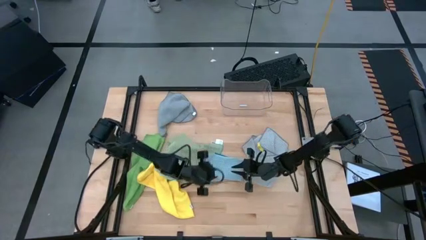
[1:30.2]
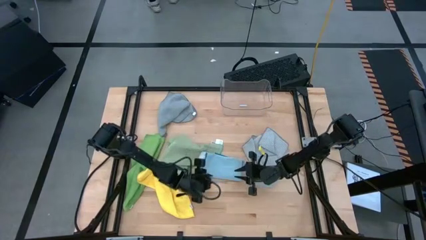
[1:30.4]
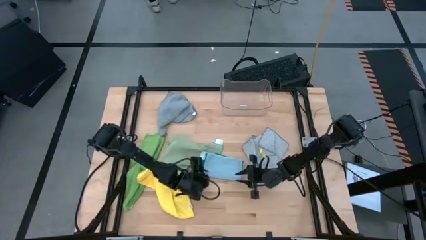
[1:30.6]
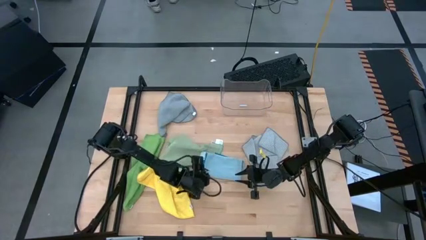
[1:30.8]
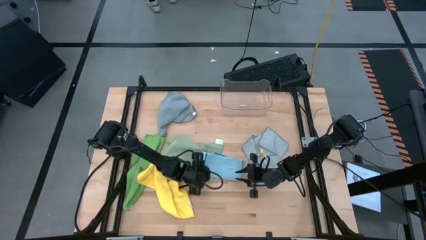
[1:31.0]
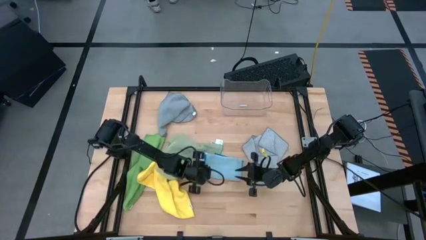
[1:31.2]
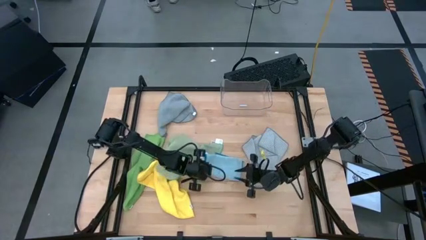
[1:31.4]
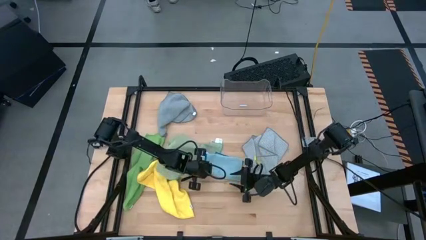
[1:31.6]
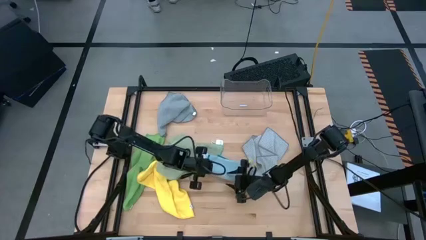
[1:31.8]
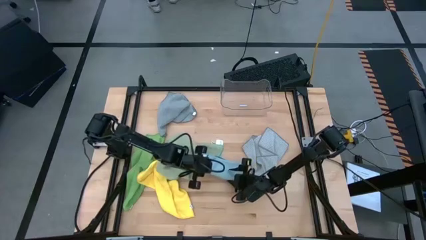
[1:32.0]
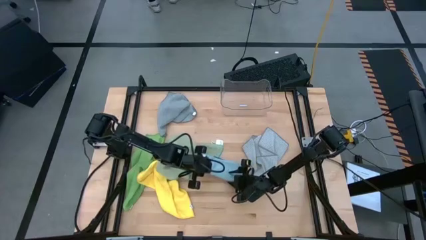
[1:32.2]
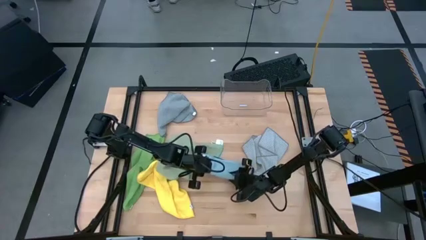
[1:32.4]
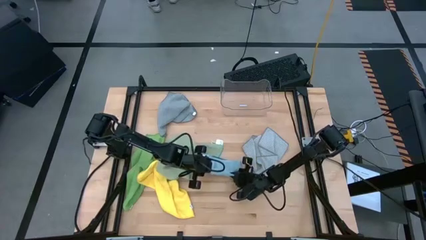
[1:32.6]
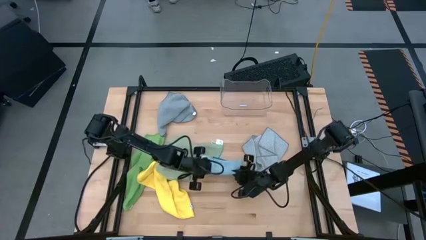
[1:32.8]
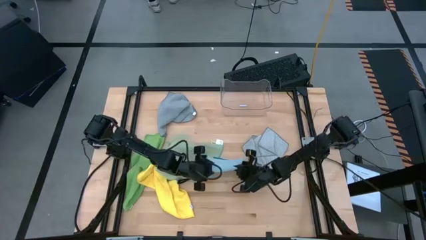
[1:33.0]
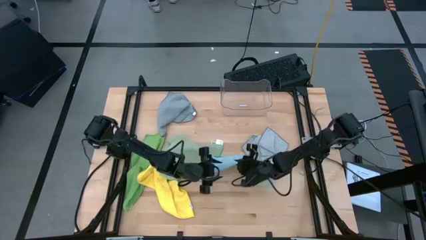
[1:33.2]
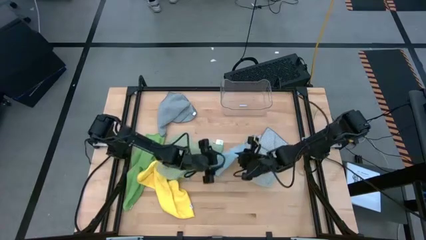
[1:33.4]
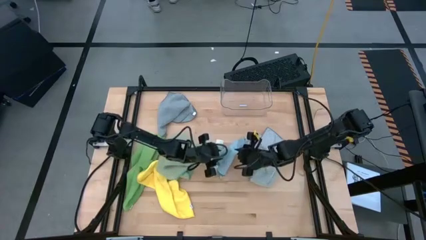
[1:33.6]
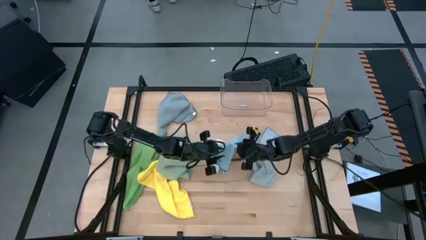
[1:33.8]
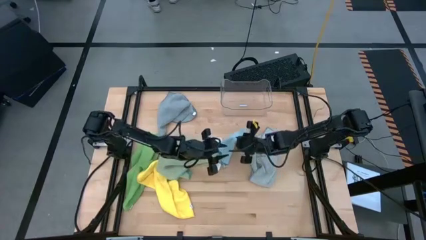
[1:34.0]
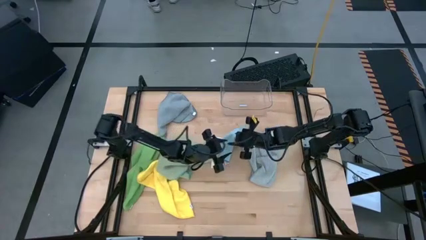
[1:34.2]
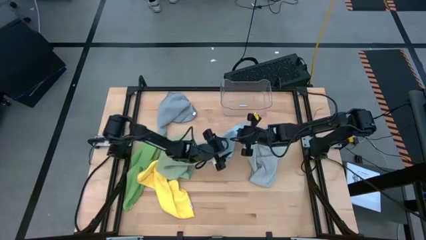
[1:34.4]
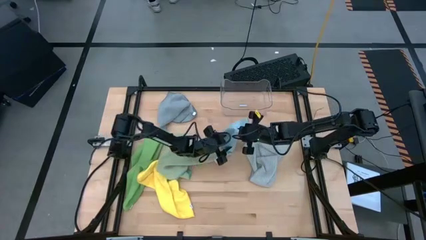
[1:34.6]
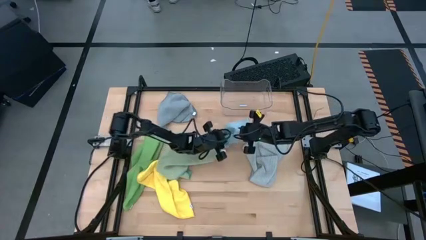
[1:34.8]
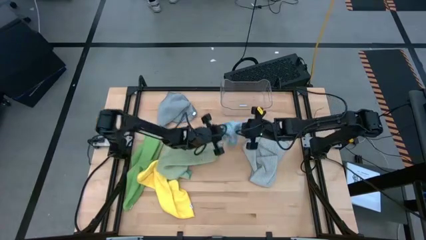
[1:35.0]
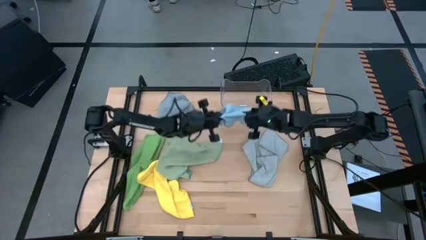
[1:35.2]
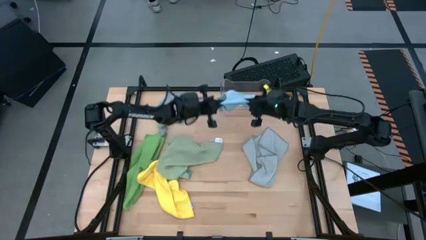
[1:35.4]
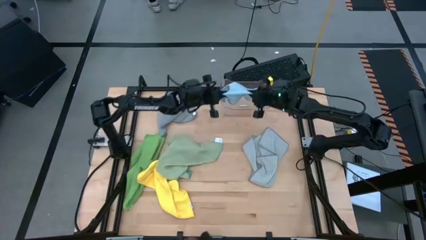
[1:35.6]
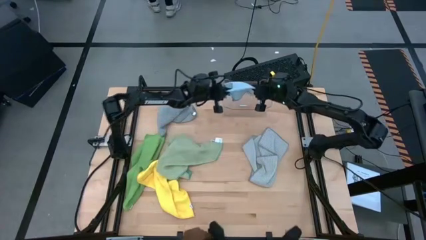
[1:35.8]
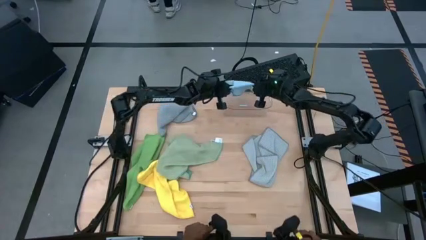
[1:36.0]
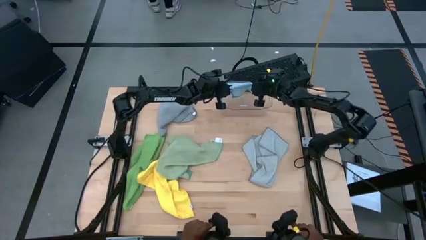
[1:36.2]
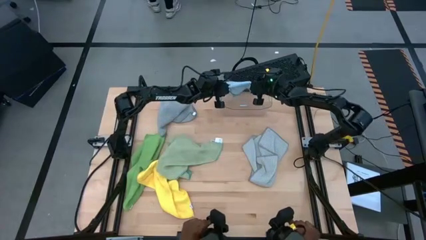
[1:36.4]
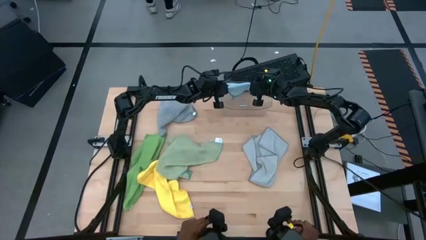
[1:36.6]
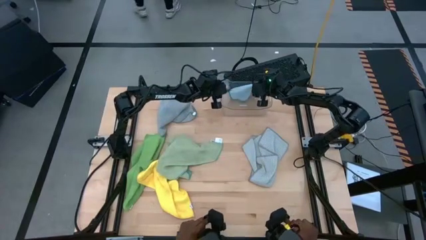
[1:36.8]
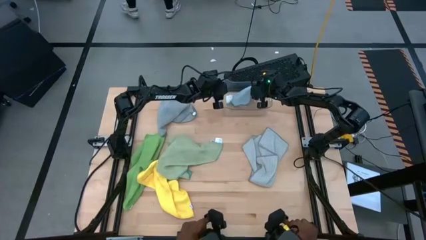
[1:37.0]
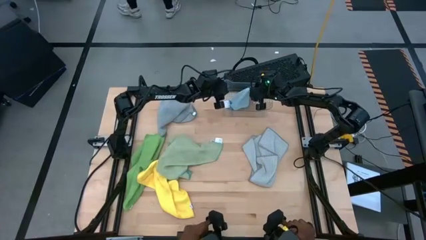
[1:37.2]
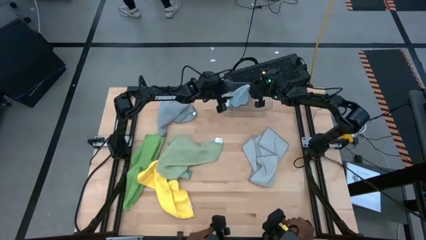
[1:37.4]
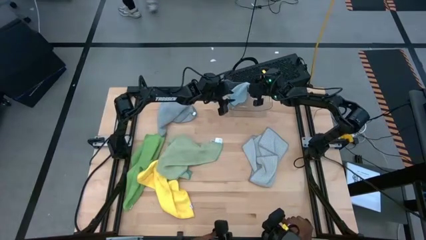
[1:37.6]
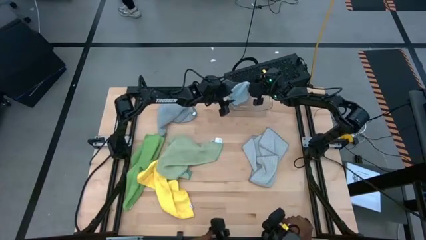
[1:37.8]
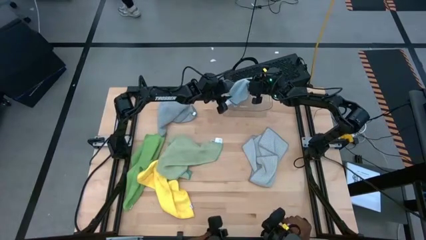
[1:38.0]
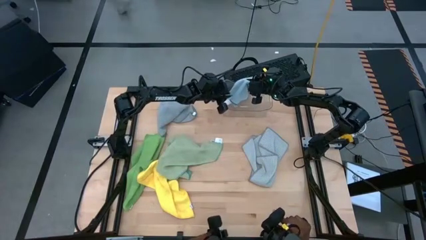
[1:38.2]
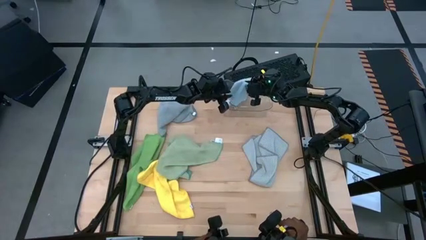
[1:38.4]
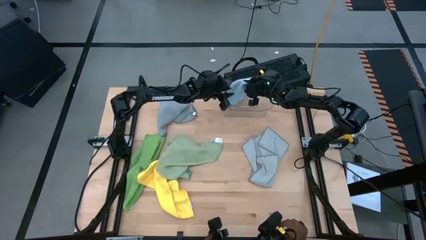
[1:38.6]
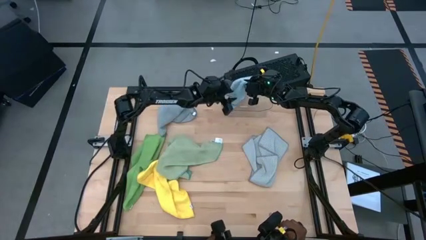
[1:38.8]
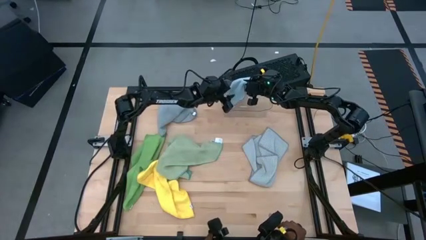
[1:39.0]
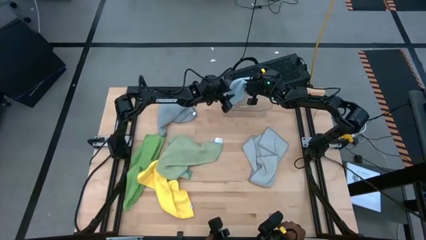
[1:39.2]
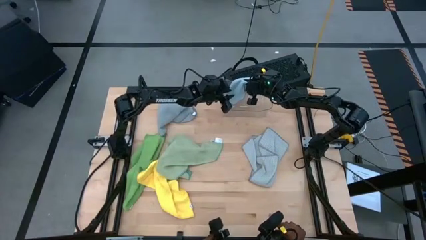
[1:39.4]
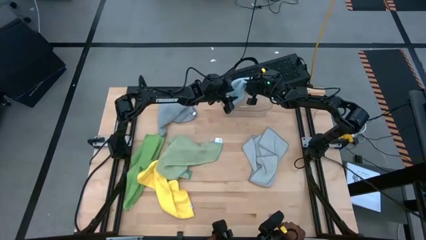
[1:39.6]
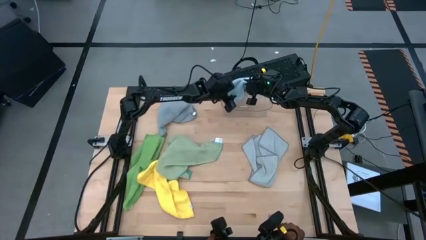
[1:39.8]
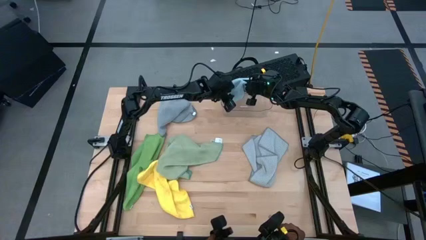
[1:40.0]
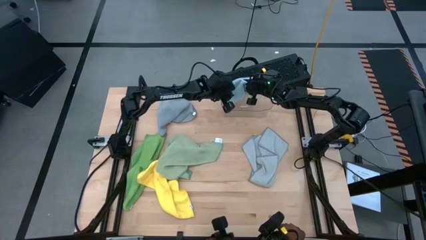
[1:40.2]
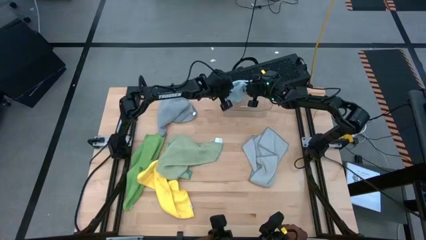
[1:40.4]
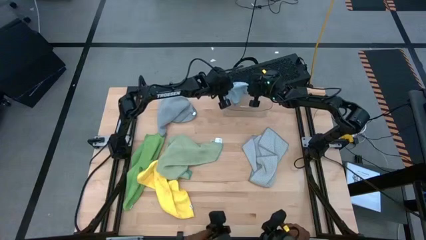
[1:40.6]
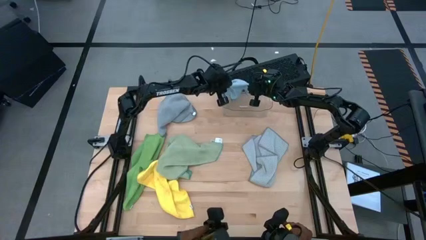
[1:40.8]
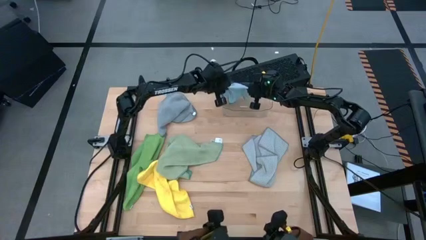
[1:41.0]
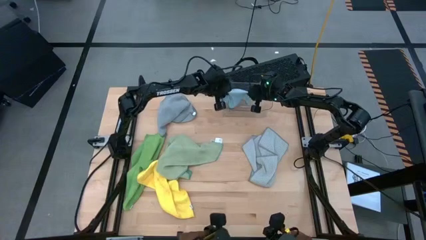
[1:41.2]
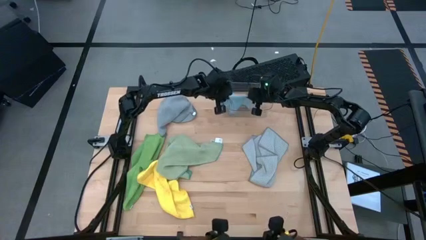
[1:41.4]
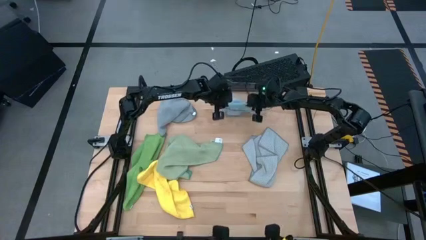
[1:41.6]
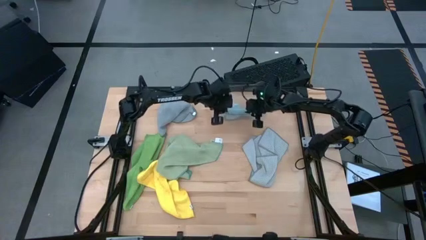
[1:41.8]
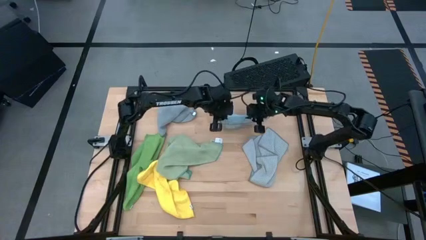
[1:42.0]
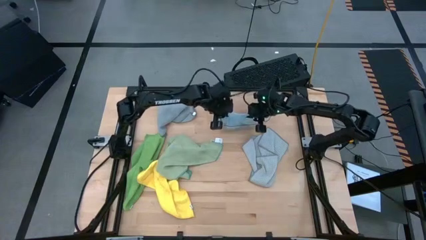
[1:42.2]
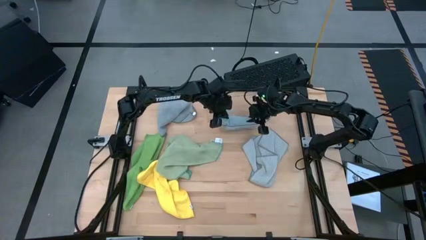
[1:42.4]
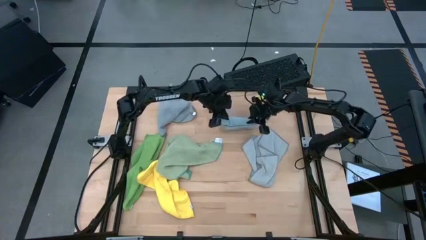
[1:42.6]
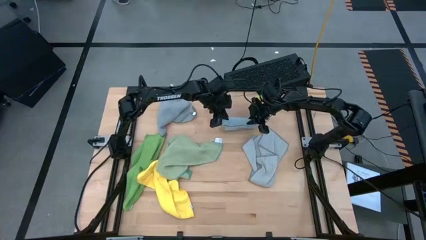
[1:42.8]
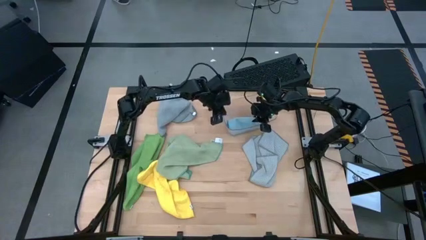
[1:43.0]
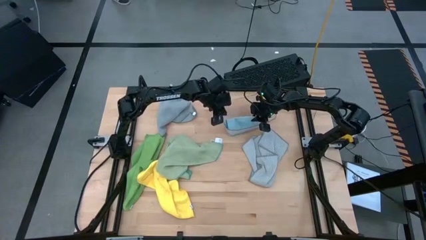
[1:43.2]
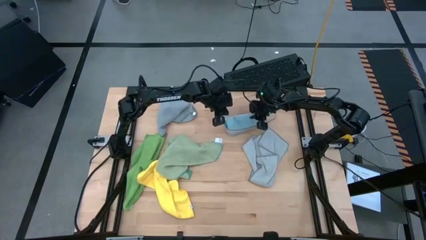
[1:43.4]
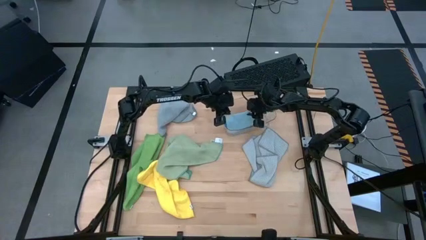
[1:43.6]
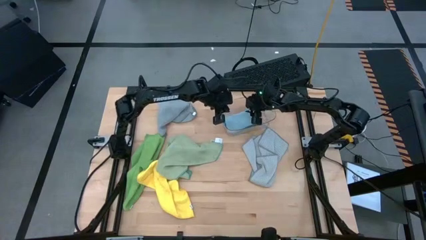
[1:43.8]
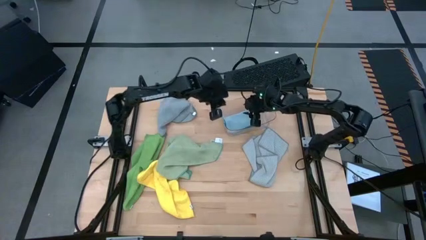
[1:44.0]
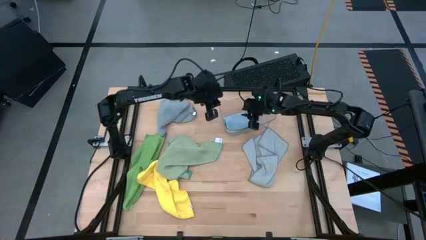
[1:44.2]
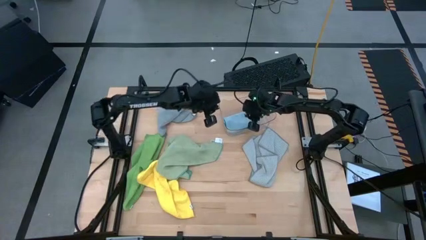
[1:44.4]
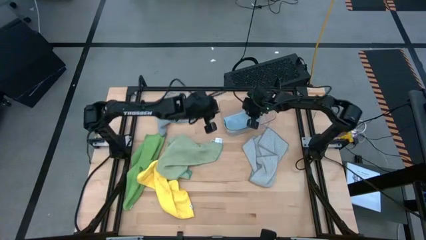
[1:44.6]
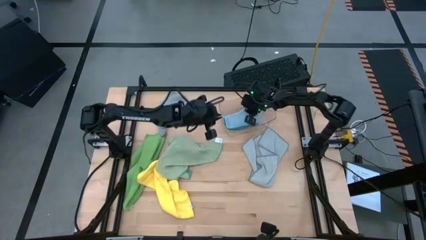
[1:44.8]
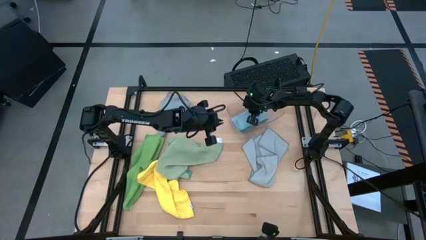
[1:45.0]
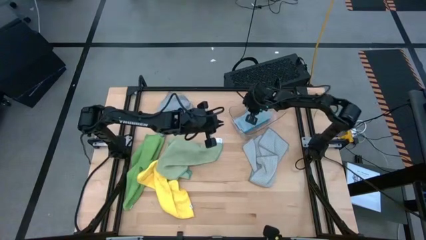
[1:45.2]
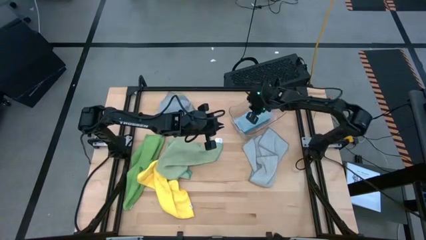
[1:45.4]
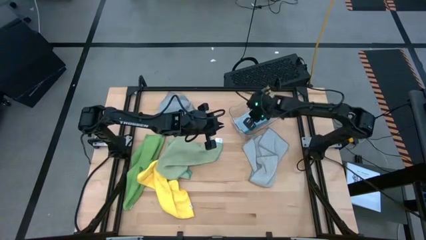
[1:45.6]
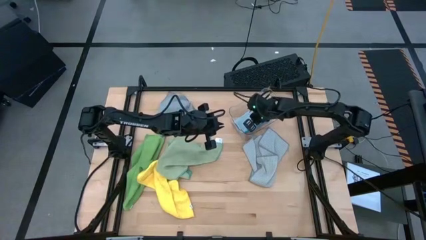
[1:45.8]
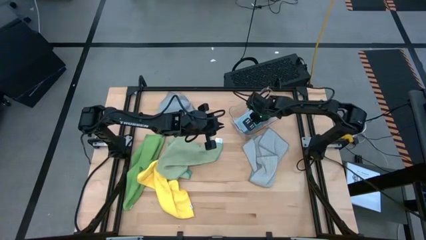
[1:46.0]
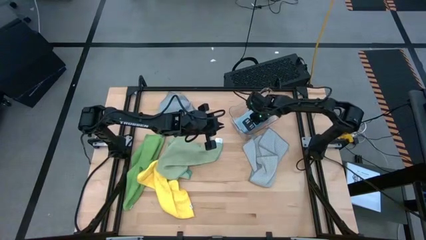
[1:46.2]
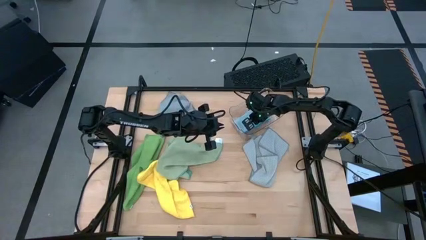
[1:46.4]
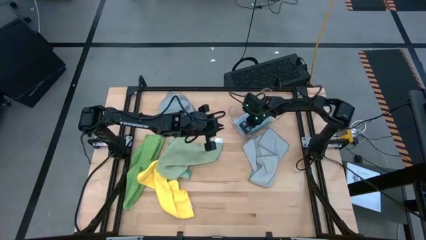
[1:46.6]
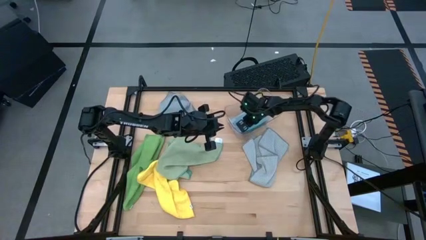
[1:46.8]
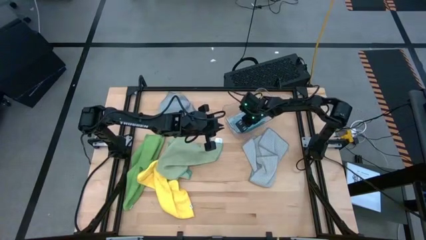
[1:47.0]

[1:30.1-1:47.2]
Task: Fold microfiber towels
Put the blue towel in the transparent bin
